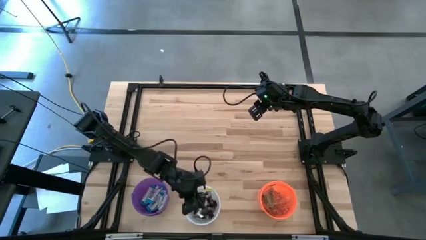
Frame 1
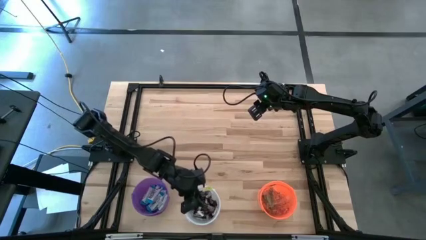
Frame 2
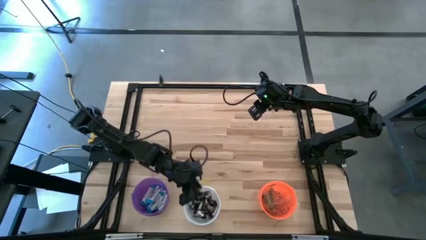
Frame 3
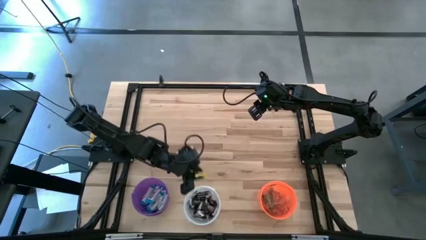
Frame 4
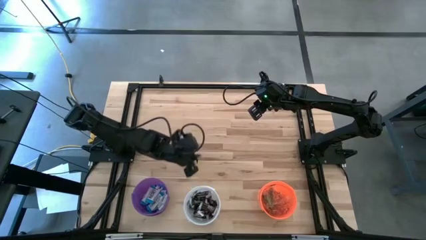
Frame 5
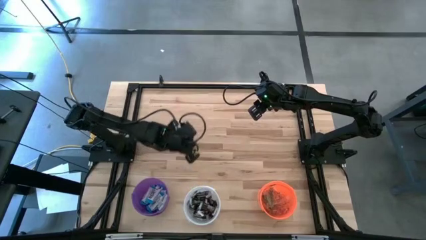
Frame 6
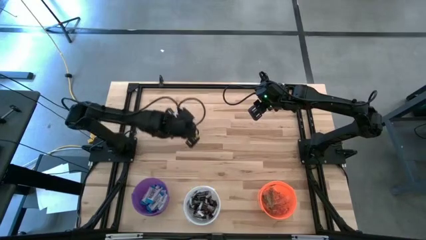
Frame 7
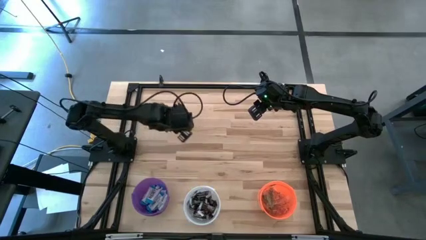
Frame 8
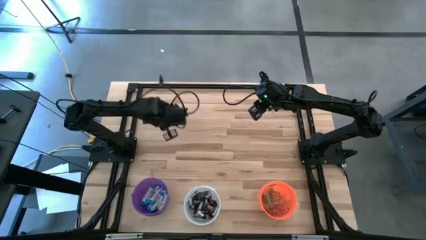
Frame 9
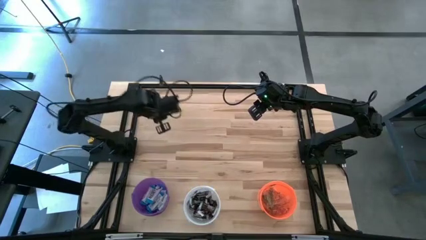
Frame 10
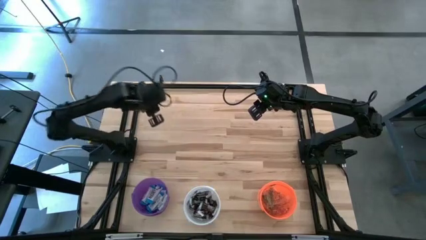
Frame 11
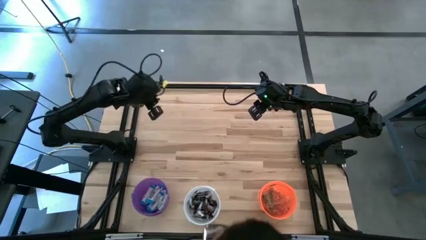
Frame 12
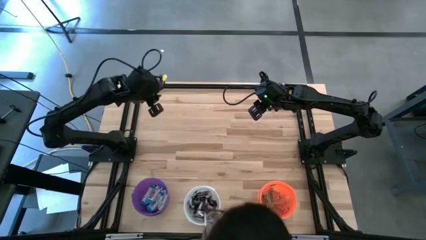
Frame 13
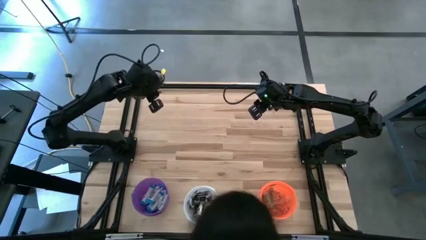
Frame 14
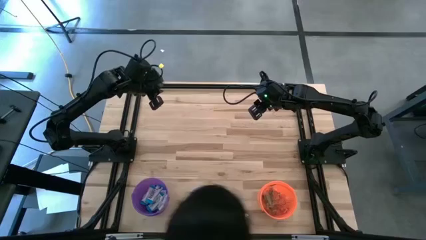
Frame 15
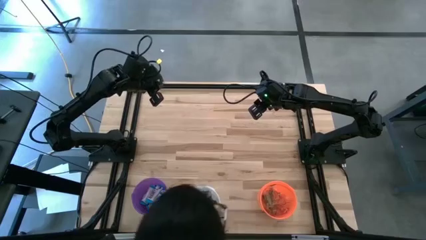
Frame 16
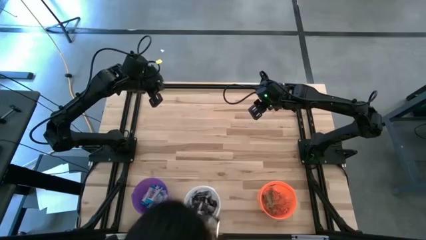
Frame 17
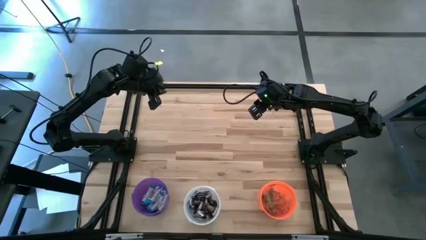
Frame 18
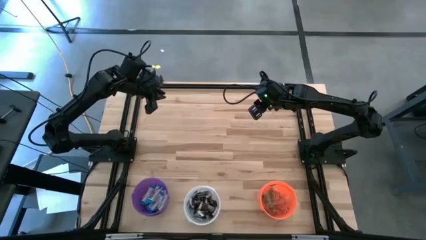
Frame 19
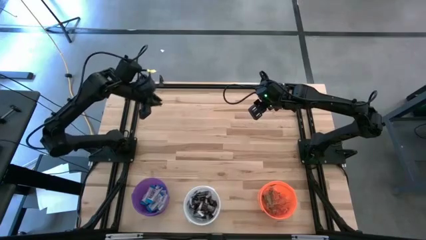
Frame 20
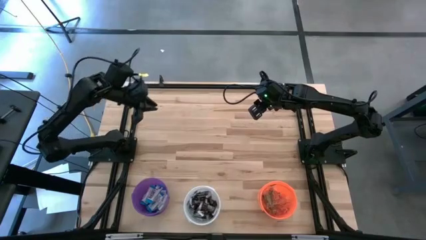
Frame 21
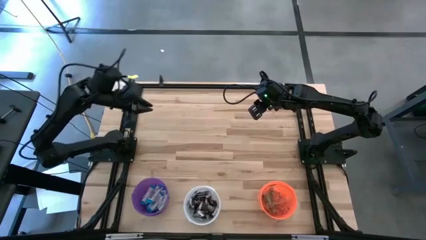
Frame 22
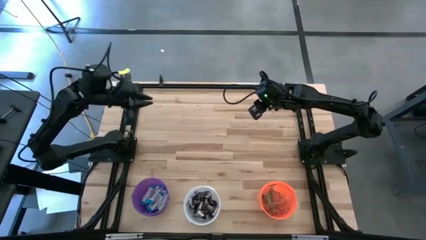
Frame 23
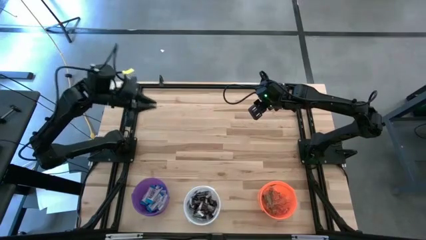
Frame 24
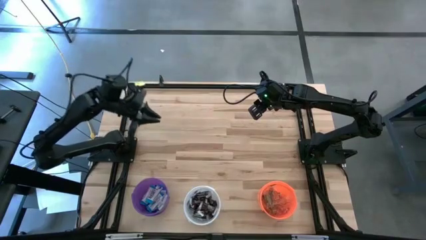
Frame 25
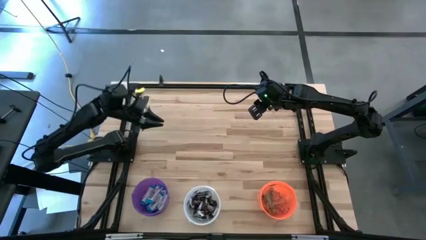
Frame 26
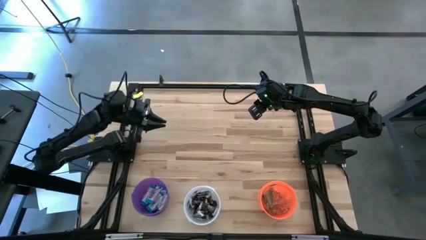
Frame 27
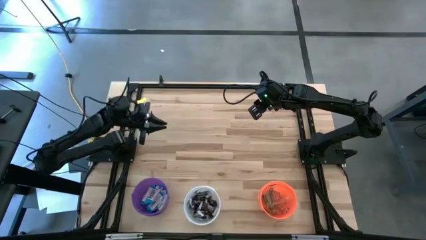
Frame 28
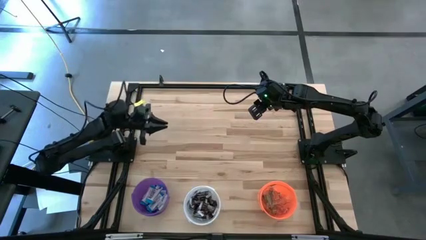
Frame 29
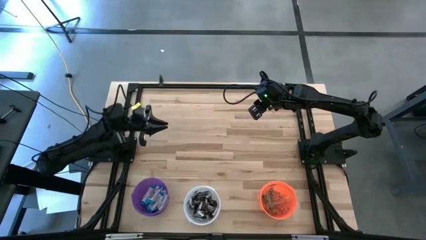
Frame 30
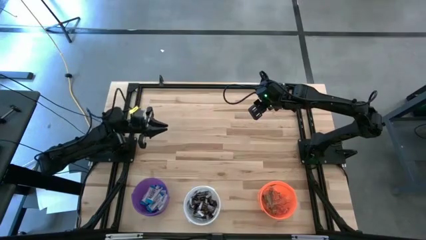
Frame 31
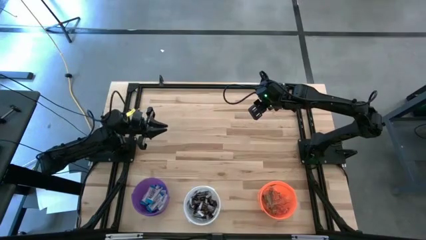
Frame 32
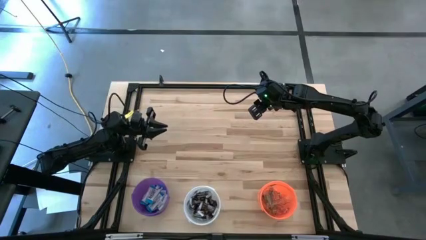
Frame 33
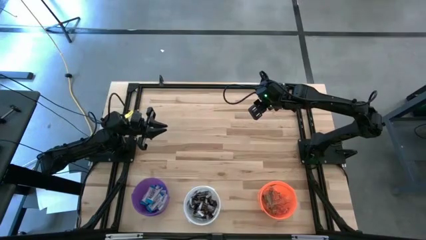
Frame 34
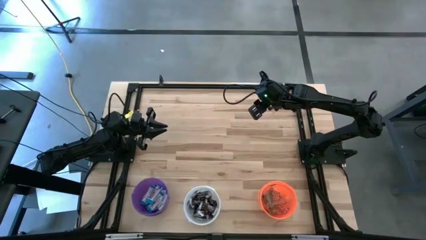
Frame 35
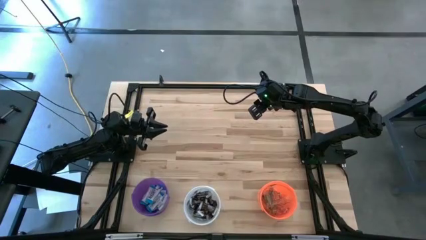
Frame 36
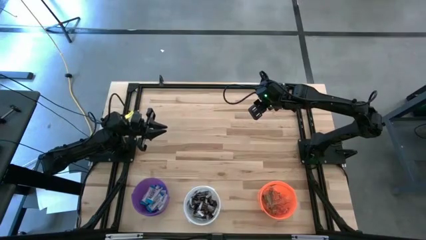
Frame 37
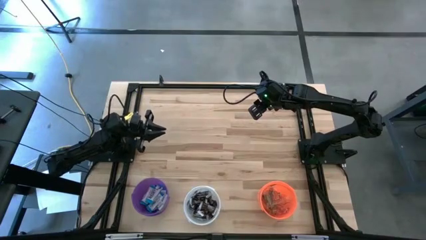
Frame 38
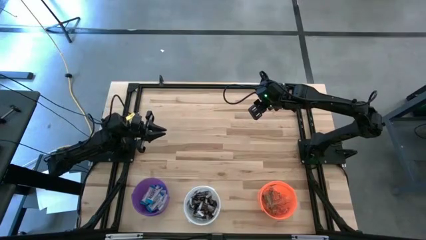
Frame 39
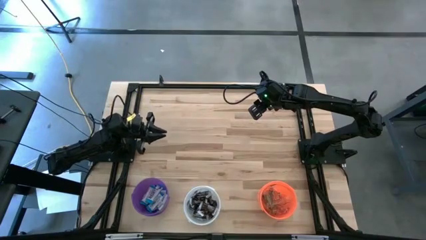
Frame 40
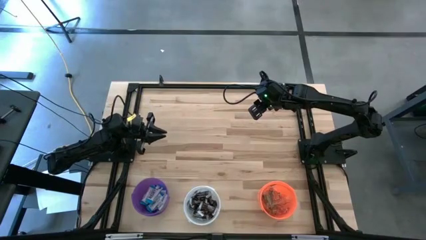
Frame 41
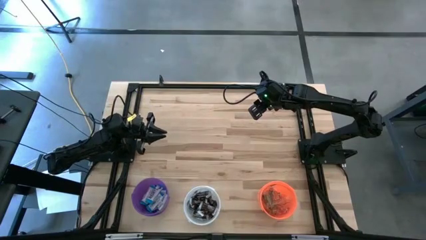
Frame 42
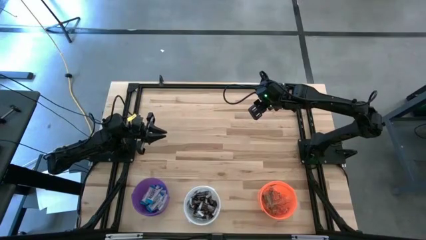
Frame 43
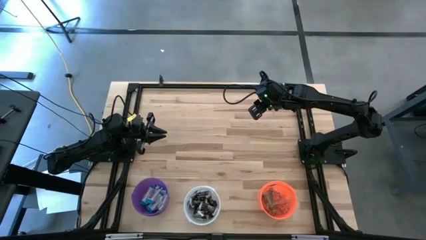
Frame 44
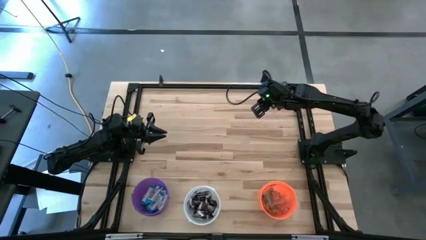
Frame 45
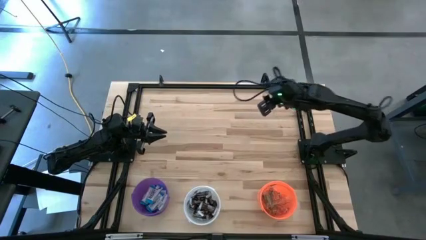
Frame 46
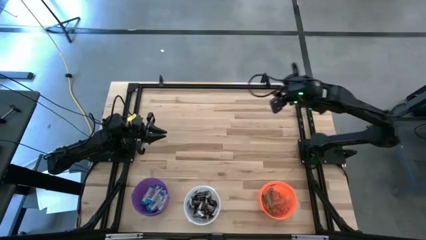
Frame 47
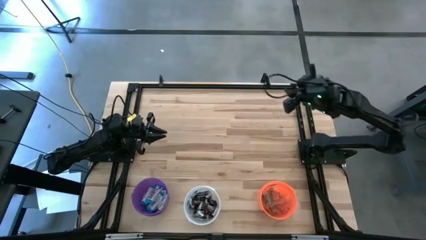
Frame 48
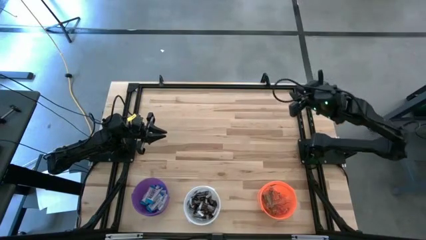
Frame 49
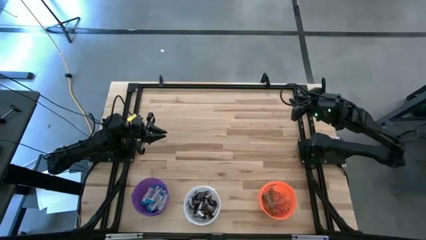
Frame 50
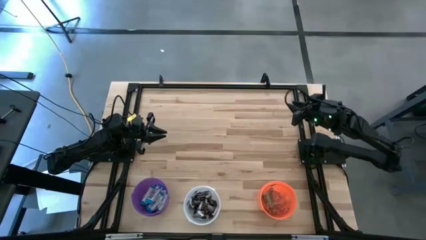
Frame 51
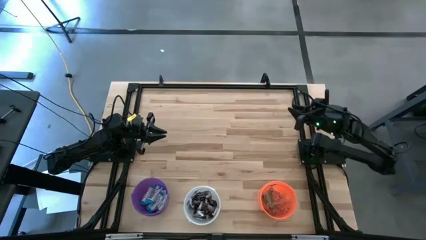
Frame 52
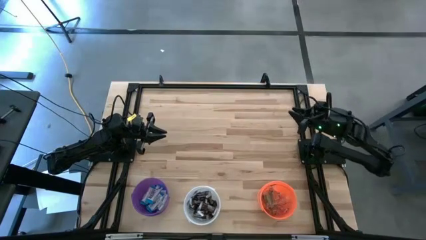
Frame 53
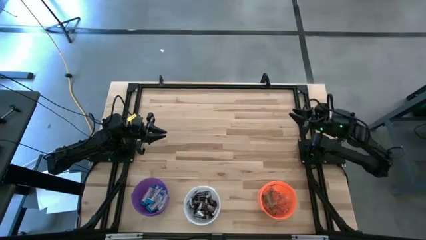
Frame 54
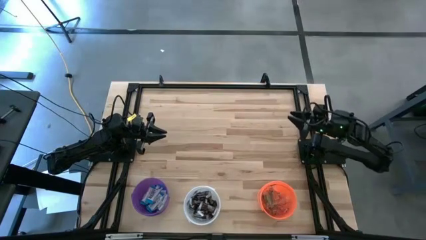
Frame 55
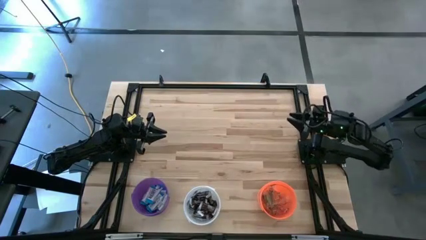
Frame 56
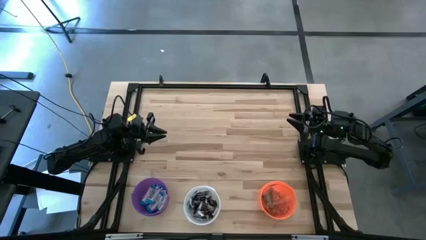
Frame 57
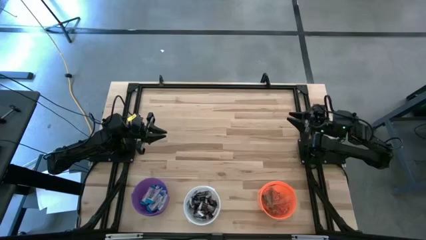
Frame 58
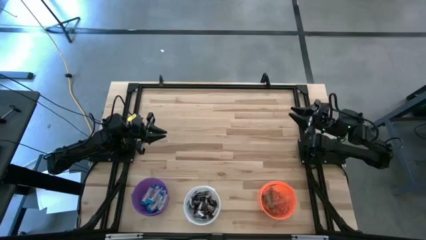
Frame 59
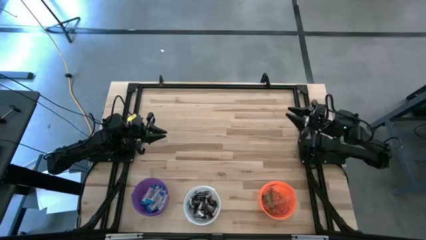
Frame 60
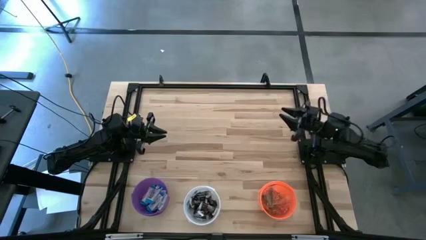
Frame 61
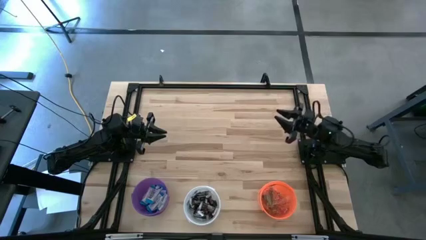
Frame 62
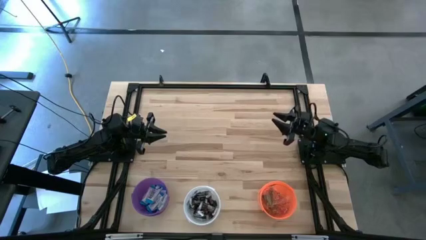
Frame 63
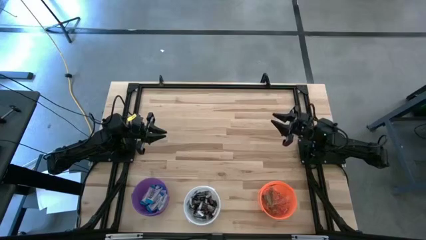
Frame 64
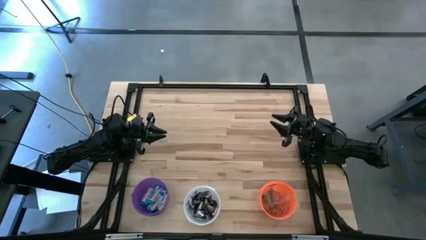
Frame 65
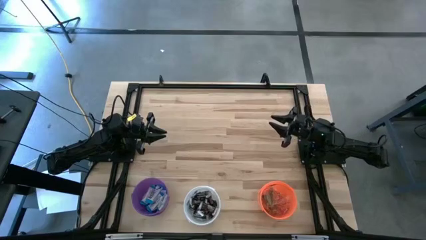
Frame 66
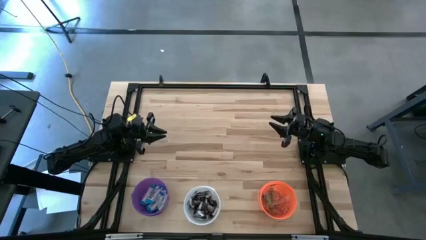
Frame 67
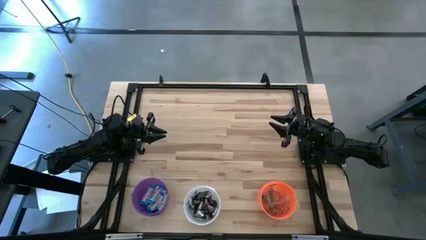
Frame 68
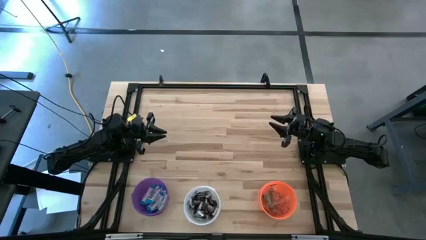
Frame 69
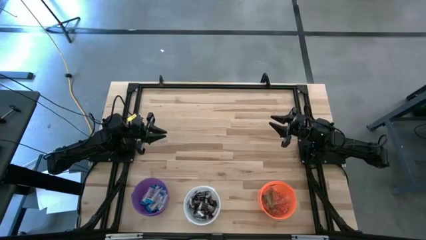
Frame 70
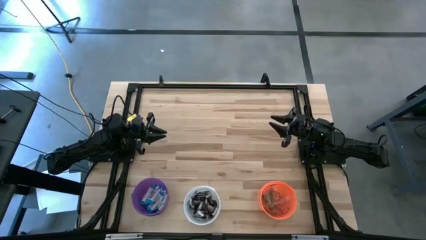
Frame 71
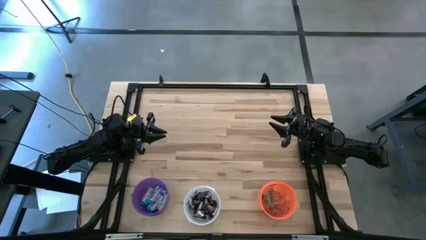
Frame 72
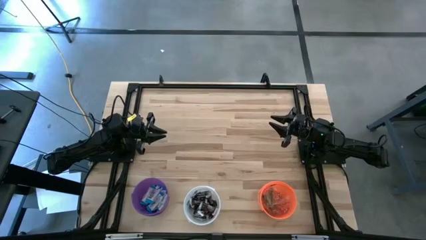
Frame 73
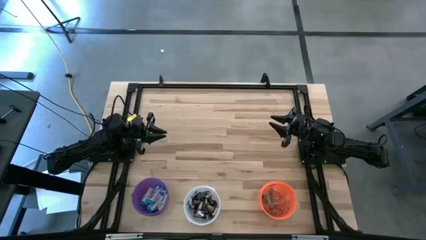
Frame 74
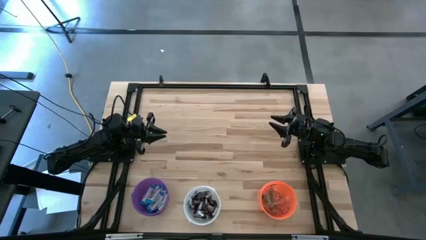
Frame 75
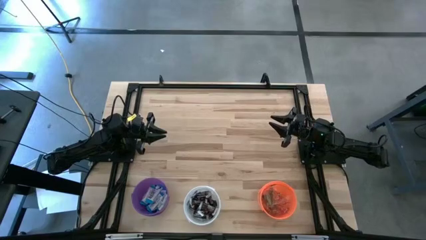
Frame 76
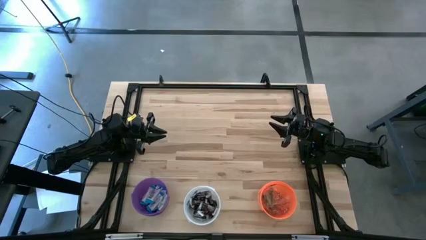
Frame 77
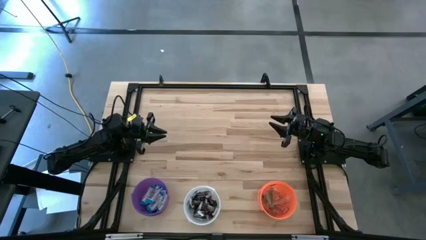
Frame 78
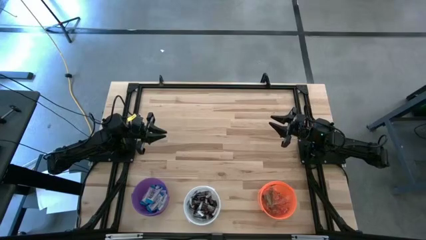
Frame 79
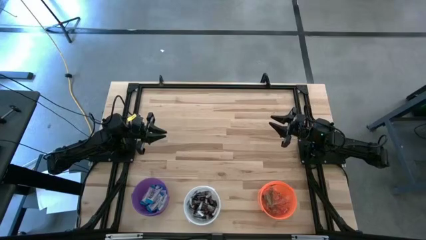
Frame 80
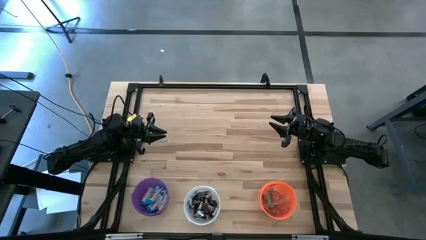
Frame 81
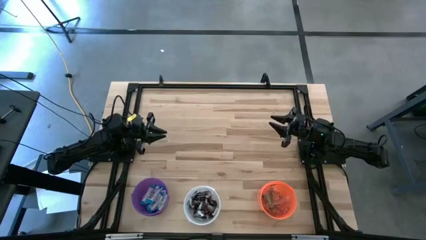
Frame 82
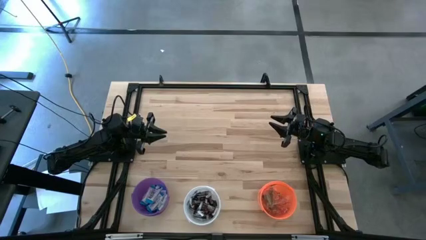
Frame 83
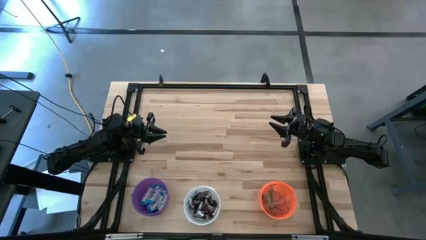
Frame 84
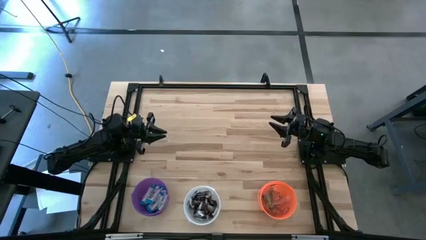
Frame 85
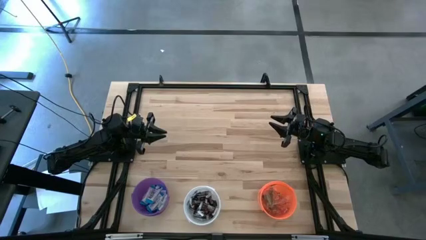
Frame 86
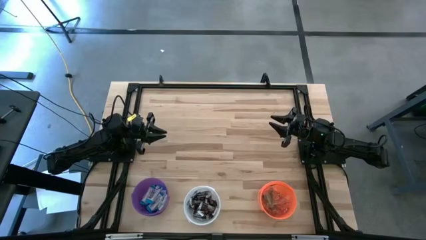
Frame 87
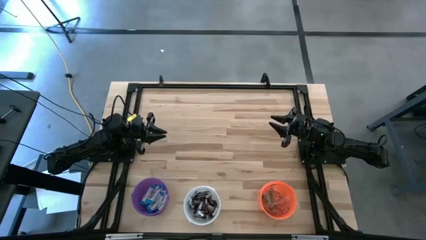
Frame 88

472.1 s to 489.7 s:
Task: Sort candy
Return to Home Position
